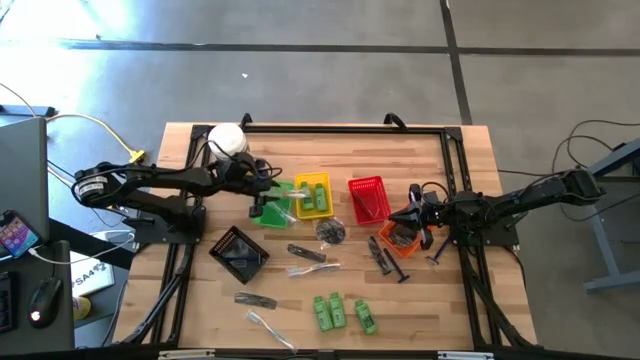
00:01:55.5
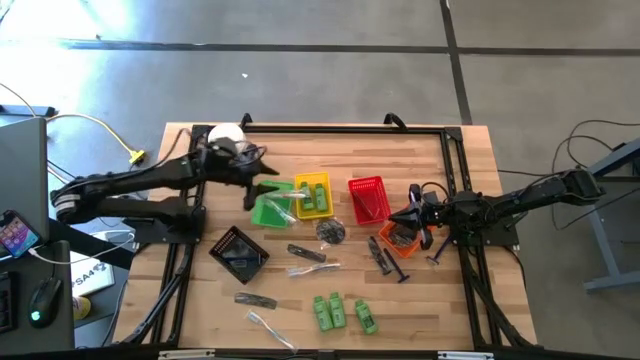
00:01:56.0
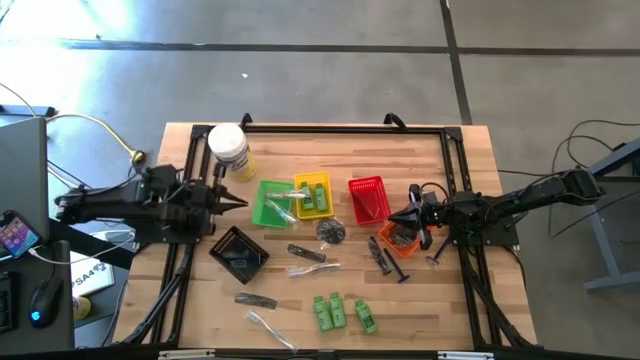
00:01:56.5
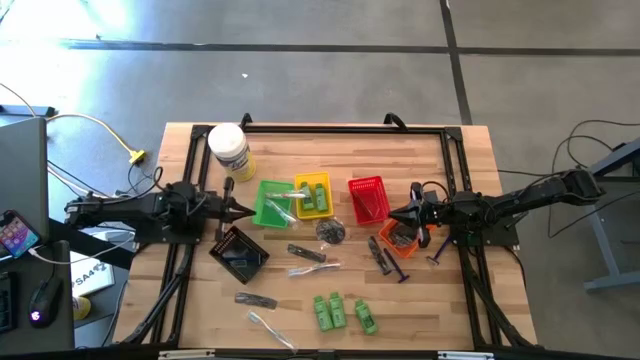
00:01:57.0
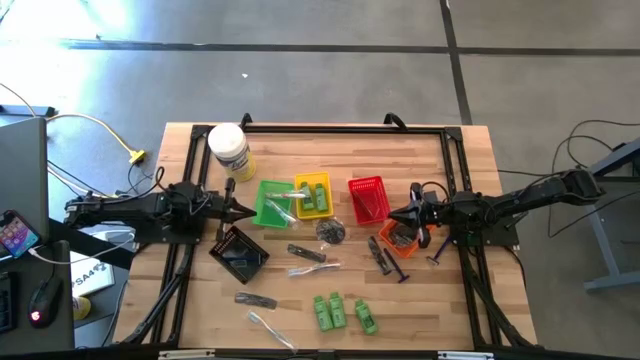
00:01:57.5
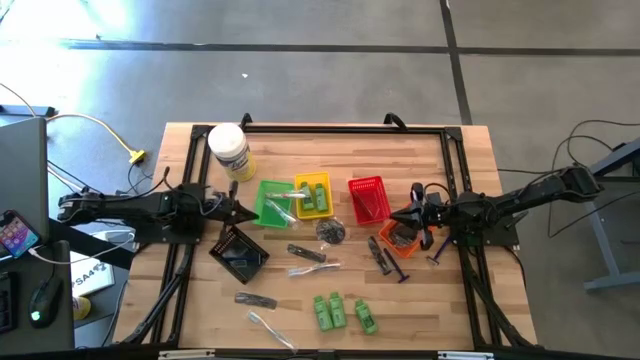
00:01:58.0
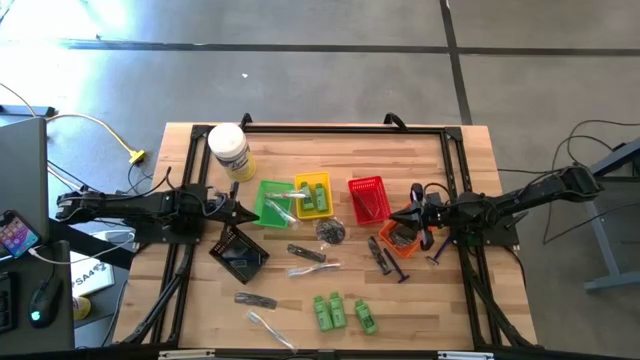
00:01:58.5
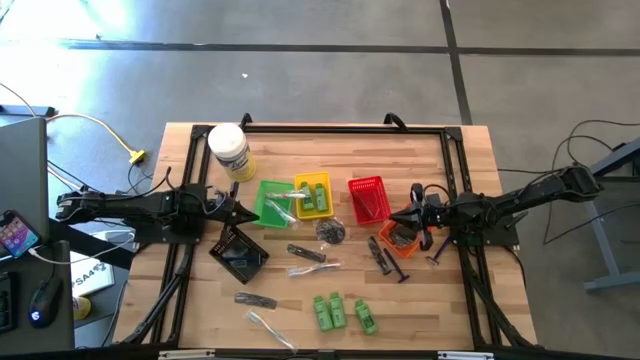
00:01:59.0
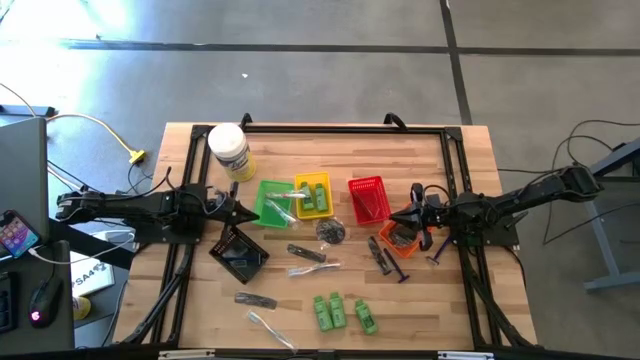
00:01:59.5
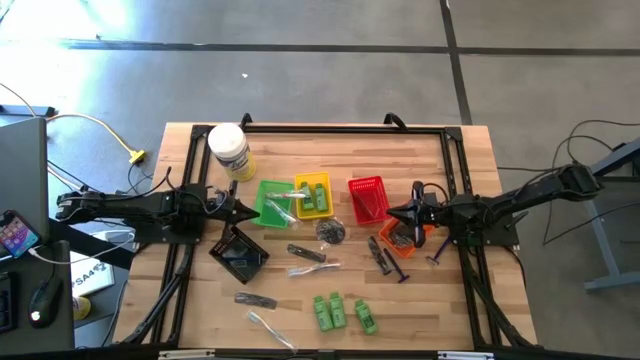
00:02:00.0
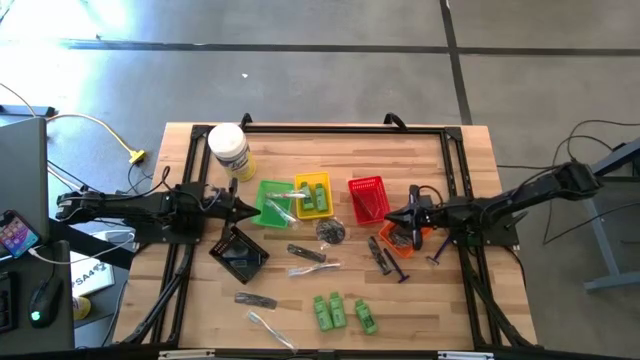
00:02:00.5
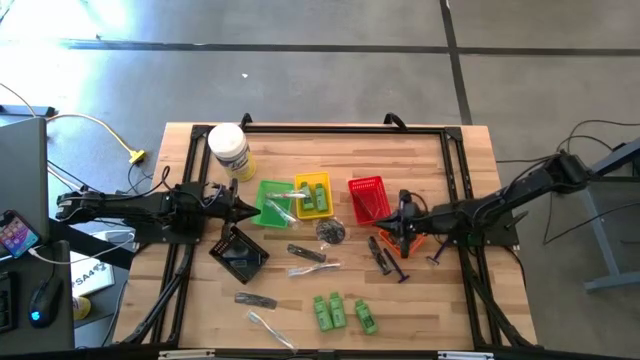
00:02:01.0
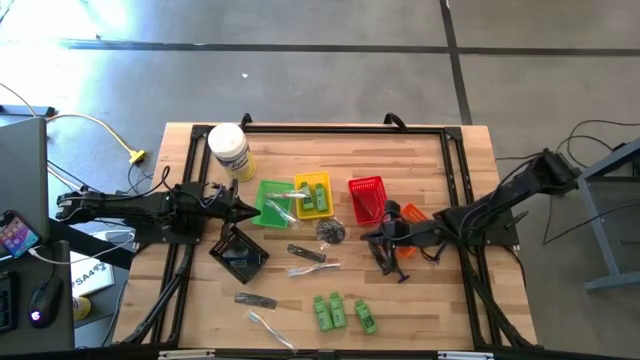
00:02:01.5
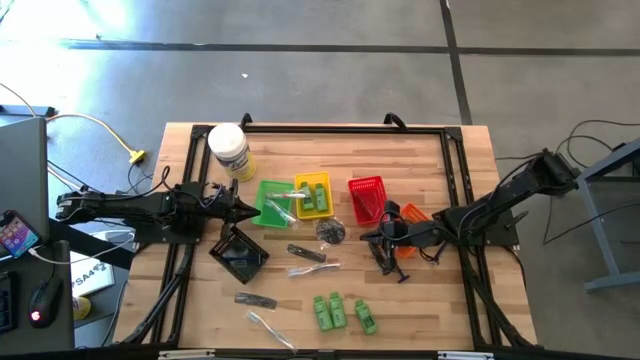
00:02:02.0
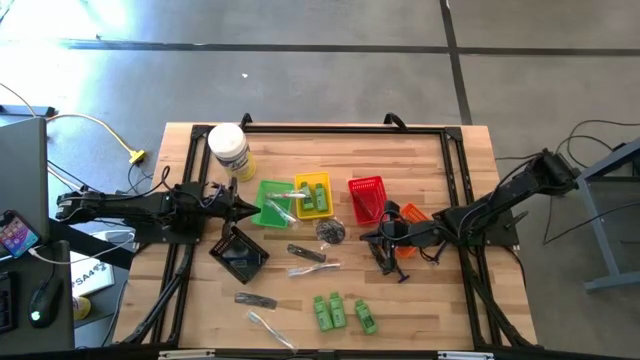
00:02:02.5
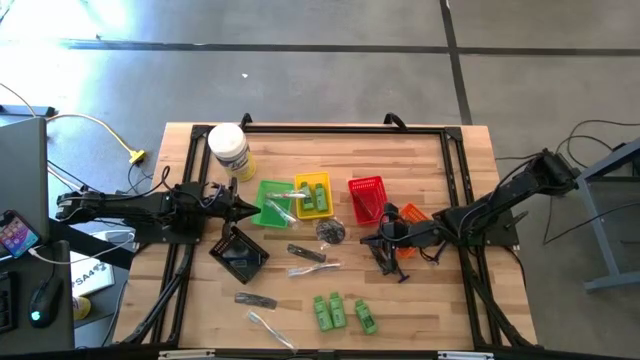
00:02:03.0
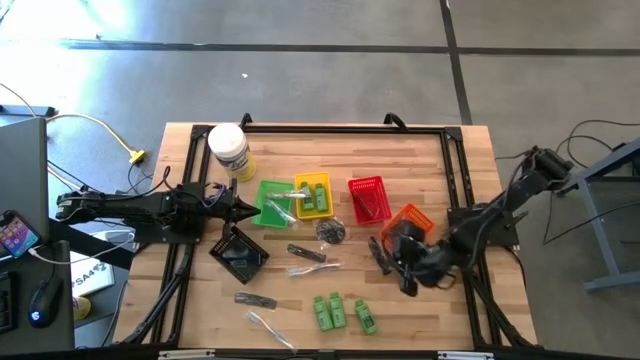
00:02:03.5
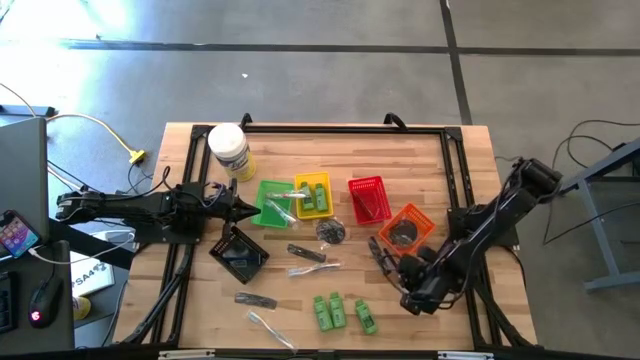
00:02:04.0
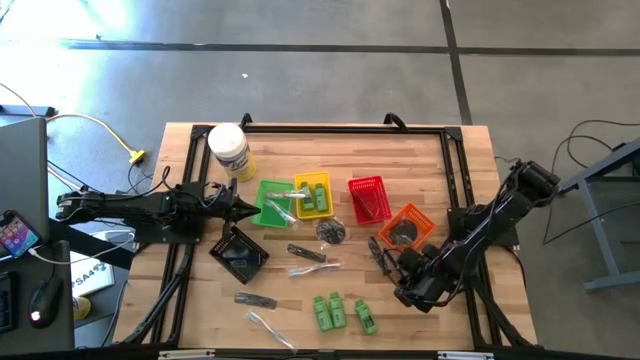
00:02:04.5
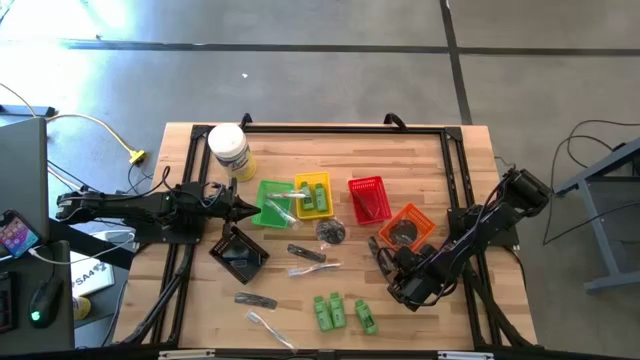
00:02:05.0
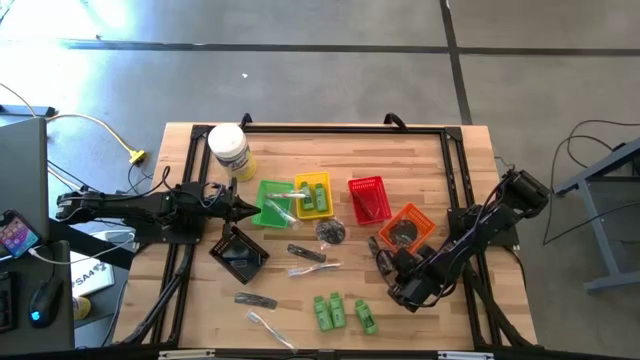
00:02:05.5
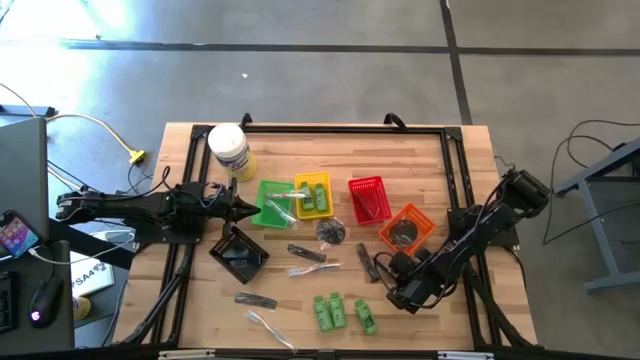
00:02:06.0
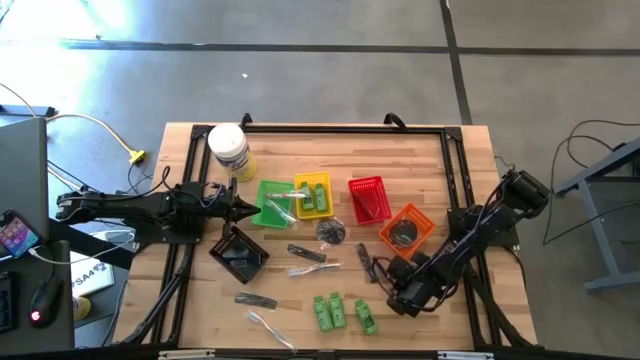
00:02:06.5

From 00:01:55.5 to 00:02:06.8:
Task: Pick & Place Travel size toiletries
Put the left blue razor into the black basket

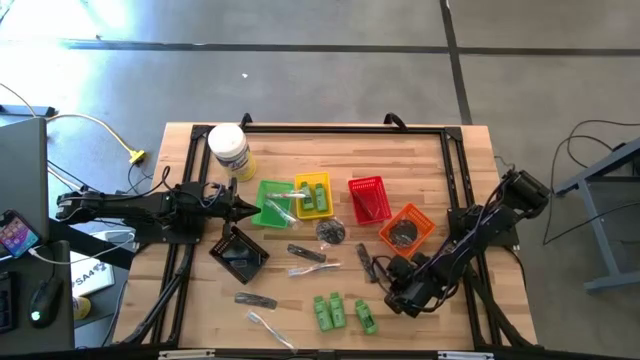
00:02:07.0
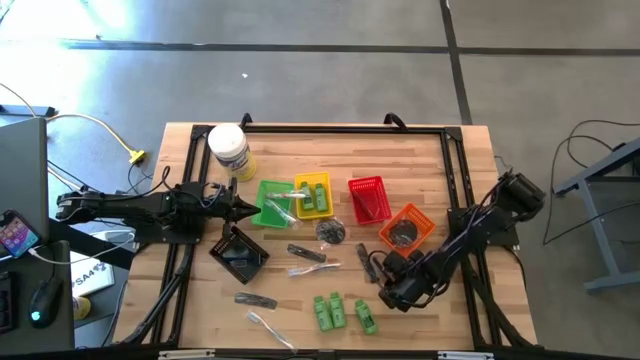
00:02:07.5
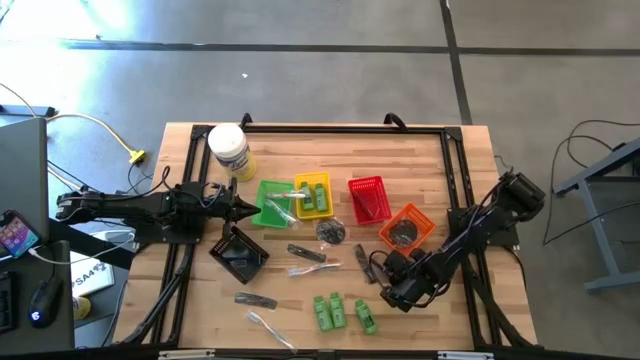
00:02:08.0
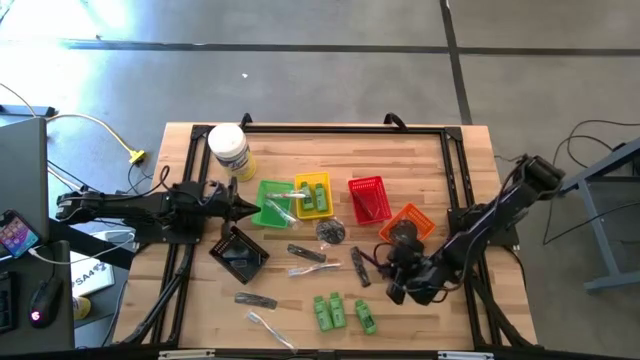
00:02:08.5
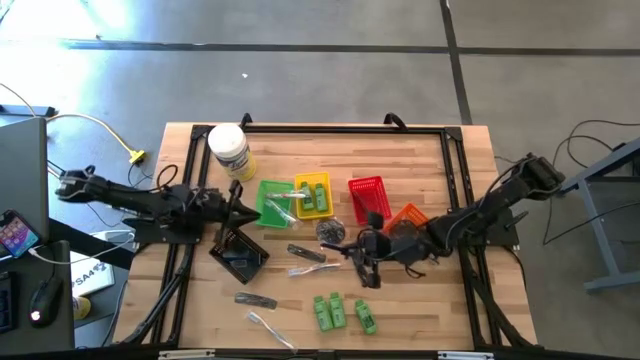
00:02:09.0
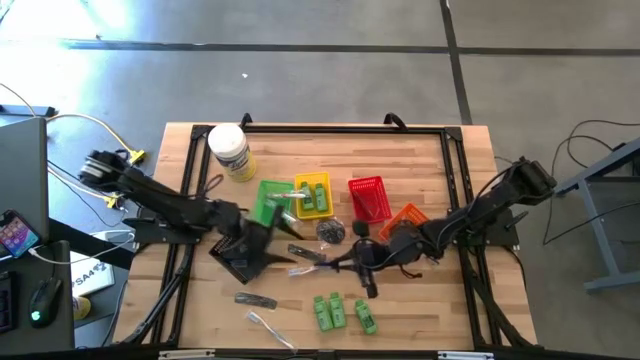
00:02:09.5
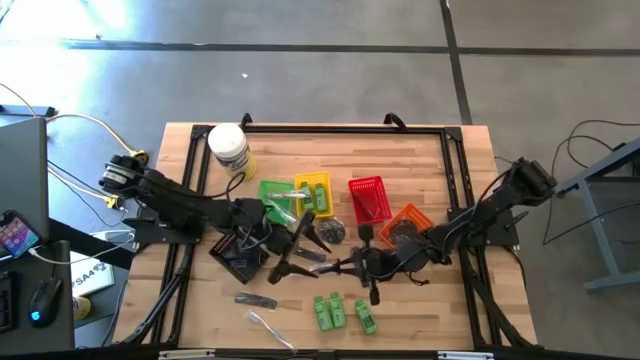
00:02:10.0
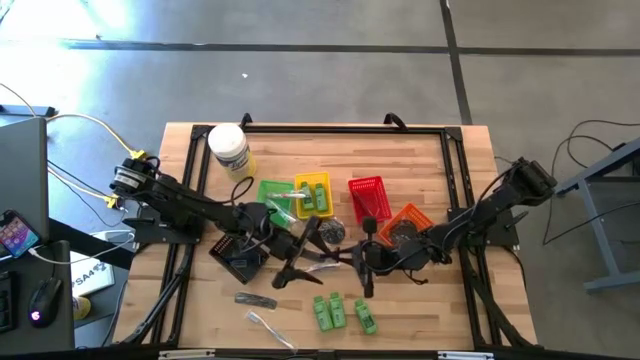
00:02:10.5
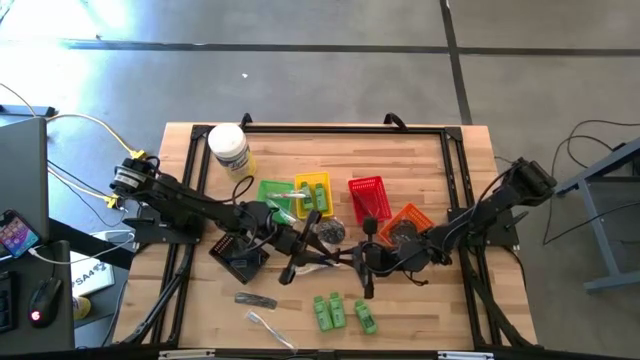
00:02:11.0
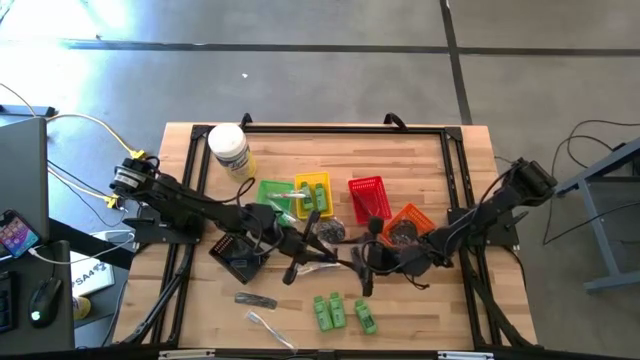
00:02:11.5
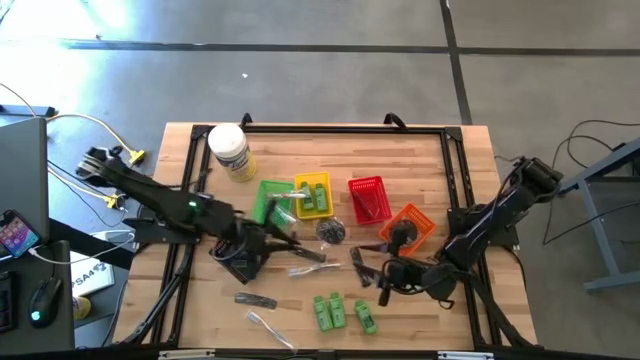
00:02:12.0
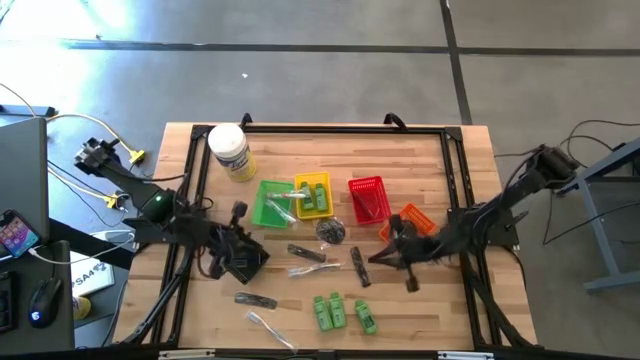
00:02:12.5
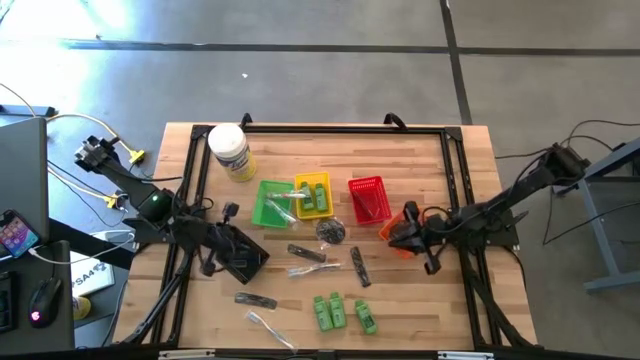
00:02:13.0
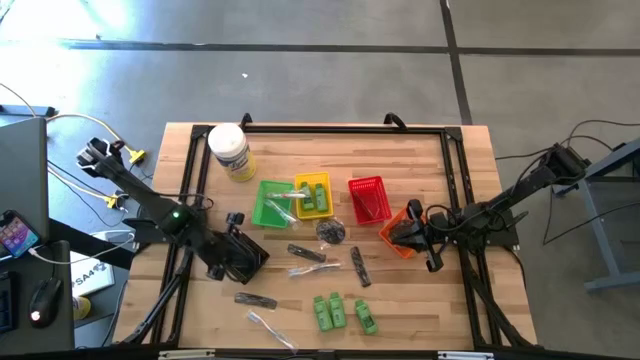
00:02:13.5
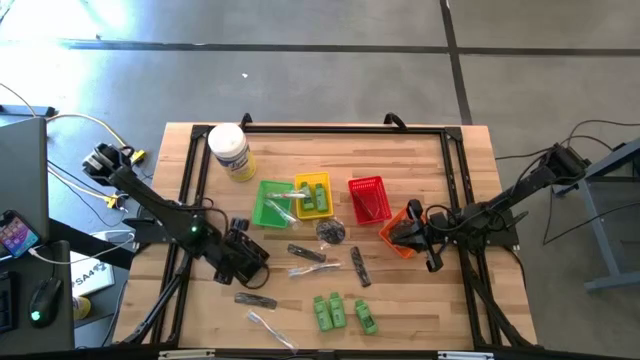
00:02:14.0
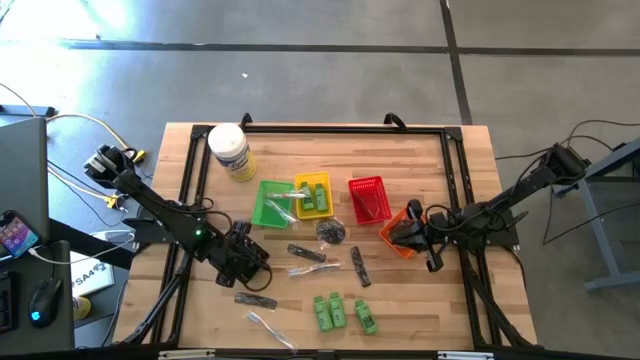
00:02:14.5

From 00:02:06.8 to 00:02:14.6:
Put the left blue razor into the black basket

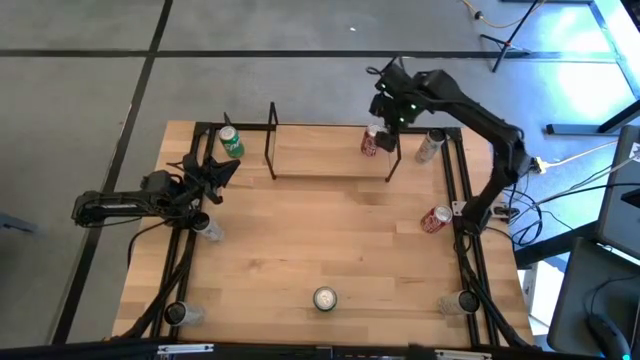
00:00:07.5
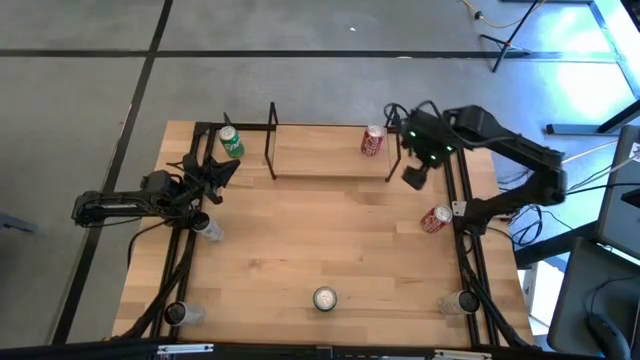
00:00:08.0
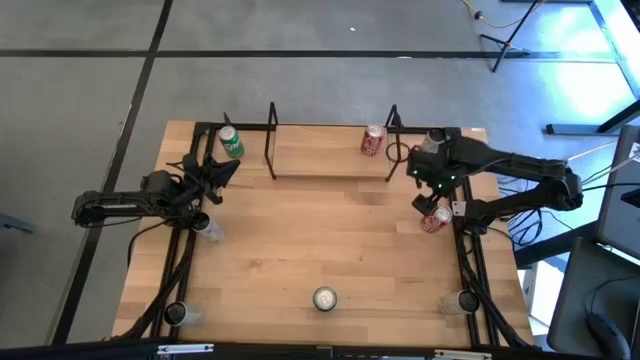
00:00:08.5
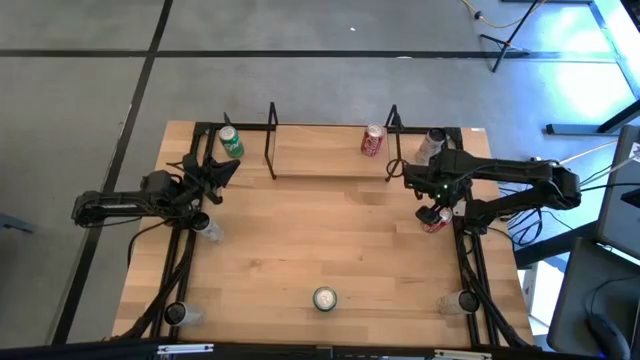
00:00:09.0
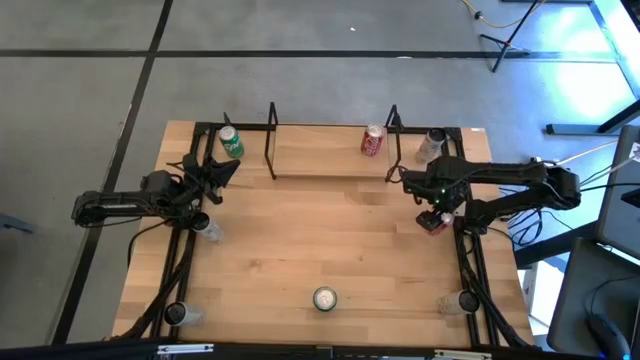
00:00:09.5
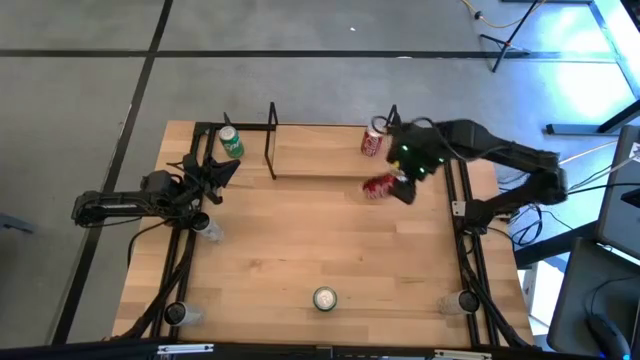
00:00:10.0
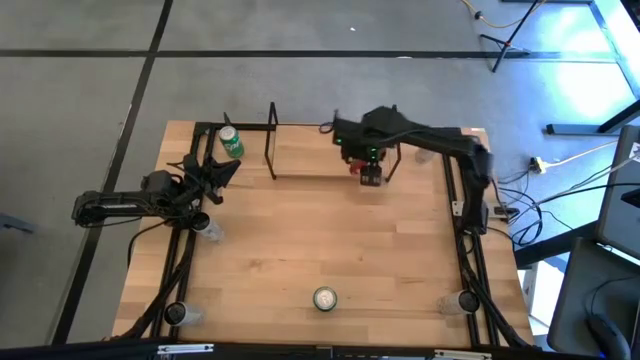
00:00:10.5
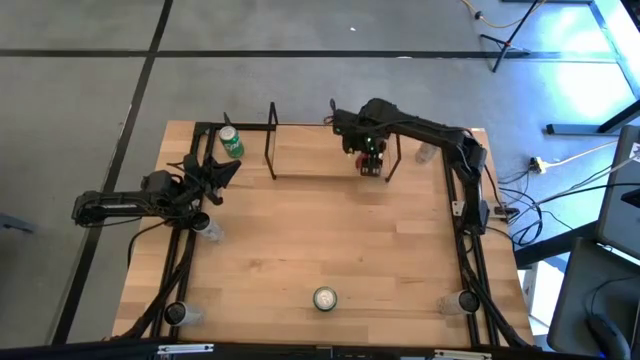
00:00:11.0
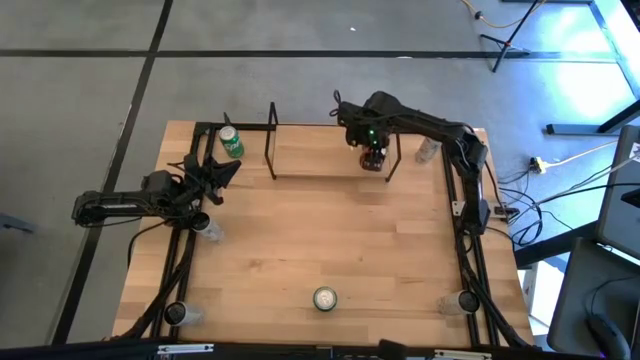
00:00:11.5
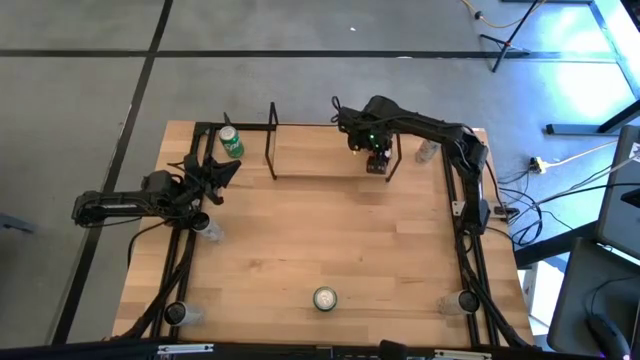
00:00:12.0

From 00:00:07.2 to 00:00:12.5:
Task: Place canned beverage on shelf
Put the red soda can on the shelf aligned with the other red soda can
